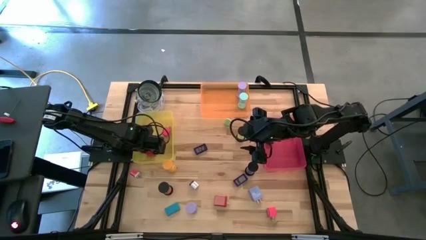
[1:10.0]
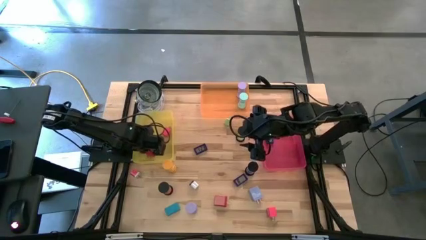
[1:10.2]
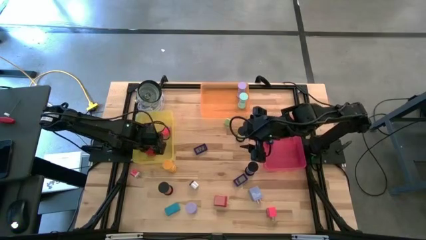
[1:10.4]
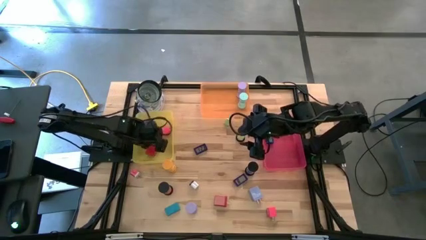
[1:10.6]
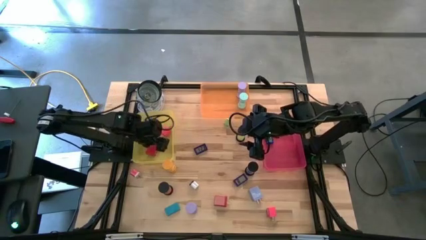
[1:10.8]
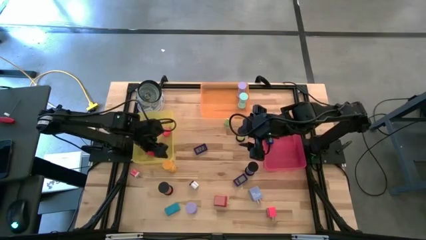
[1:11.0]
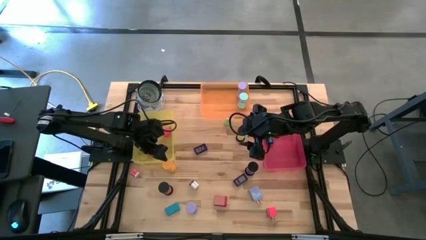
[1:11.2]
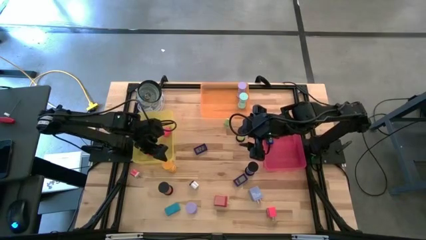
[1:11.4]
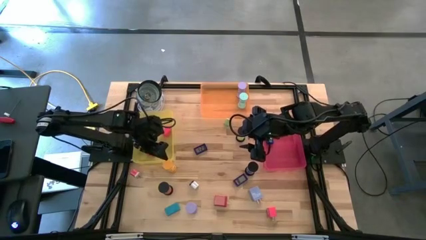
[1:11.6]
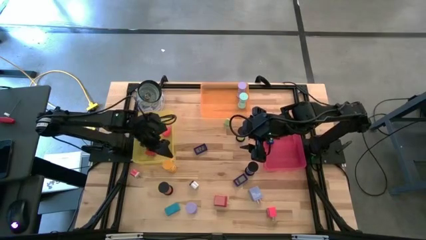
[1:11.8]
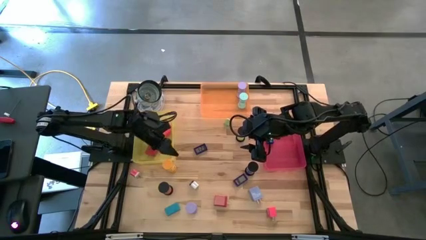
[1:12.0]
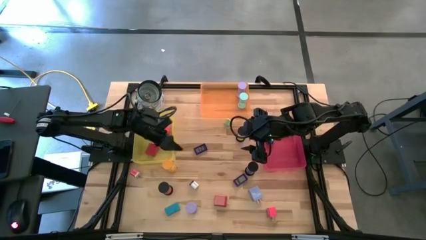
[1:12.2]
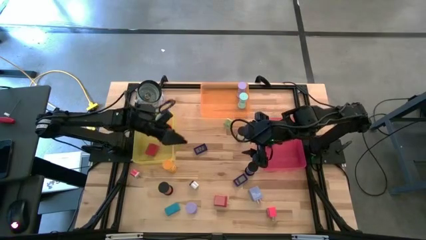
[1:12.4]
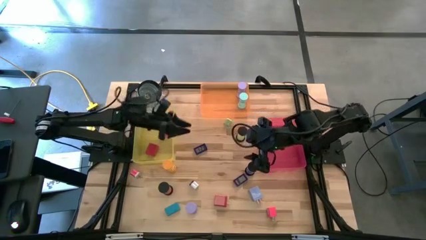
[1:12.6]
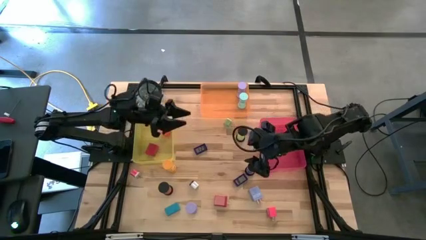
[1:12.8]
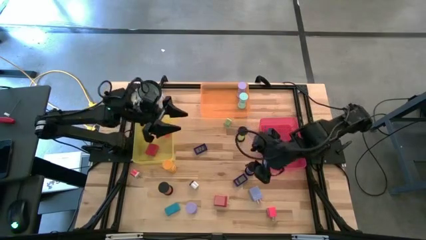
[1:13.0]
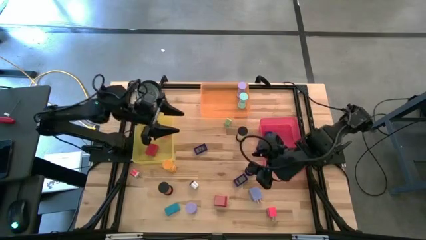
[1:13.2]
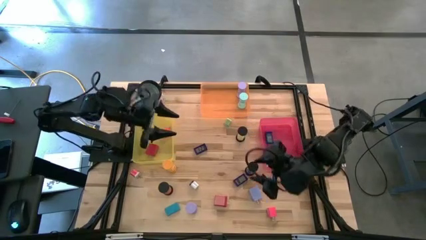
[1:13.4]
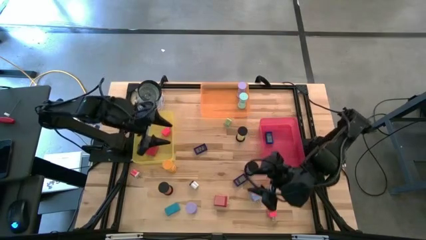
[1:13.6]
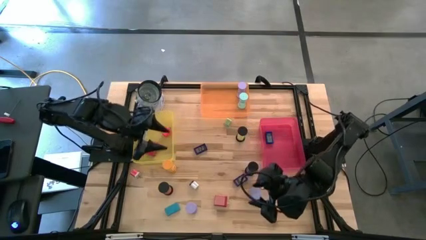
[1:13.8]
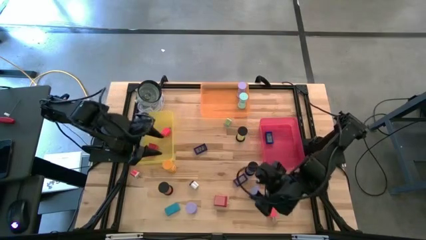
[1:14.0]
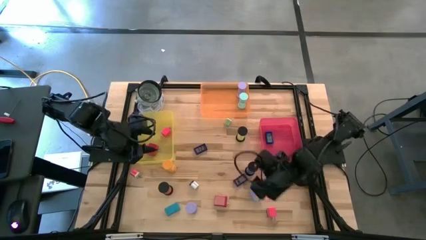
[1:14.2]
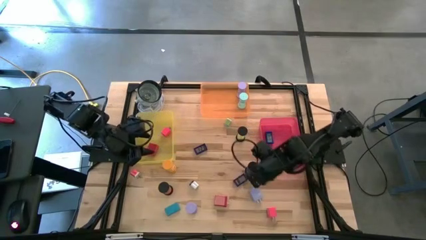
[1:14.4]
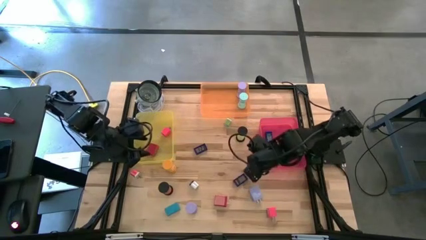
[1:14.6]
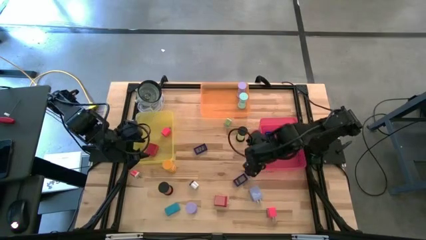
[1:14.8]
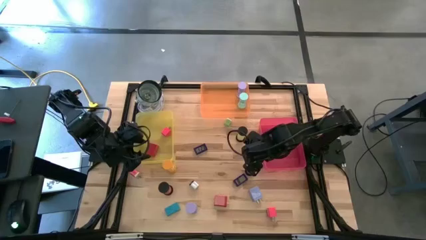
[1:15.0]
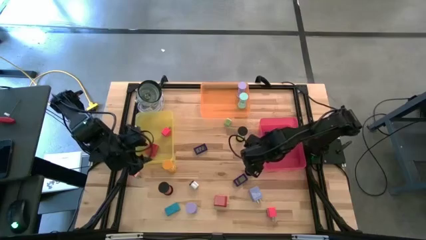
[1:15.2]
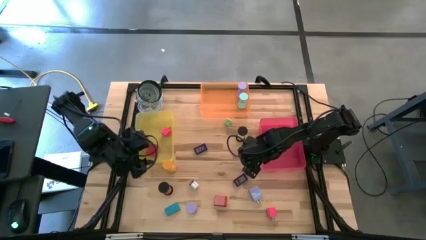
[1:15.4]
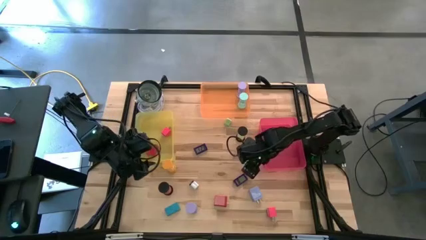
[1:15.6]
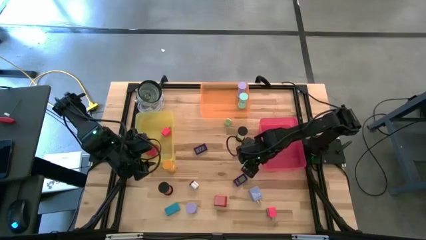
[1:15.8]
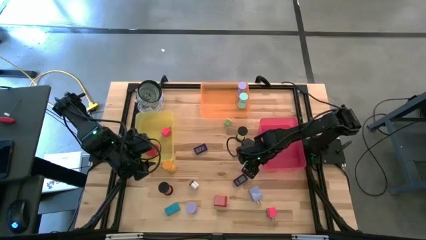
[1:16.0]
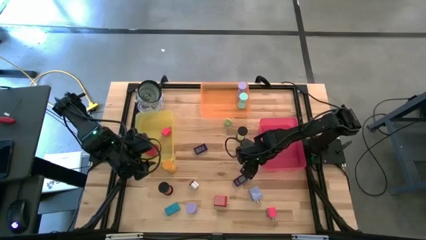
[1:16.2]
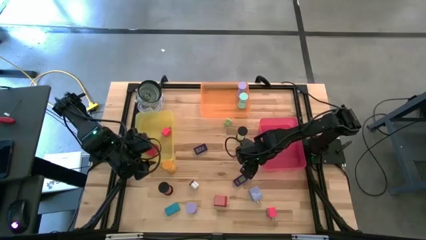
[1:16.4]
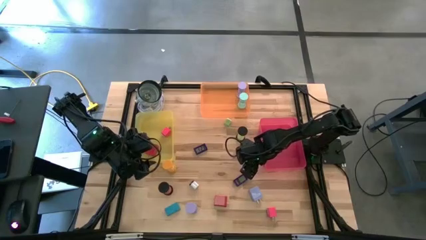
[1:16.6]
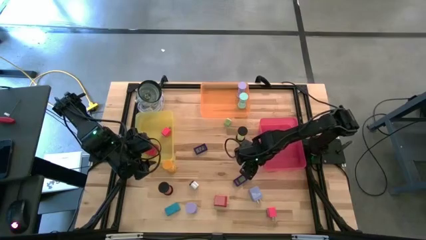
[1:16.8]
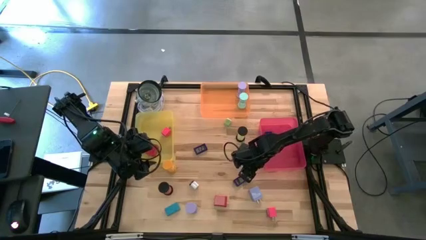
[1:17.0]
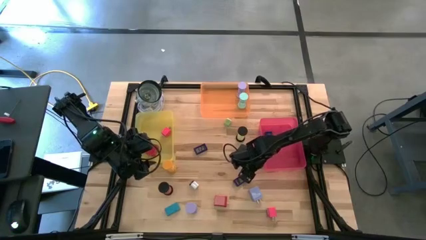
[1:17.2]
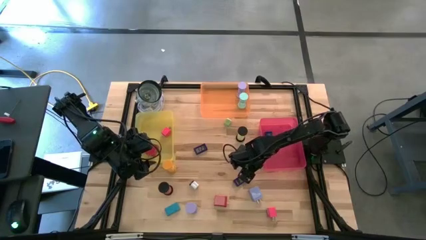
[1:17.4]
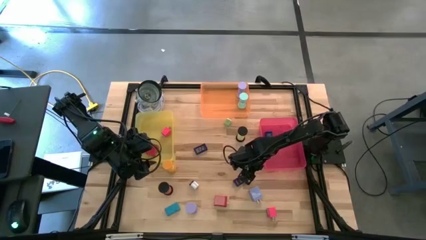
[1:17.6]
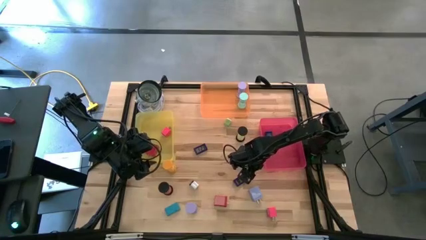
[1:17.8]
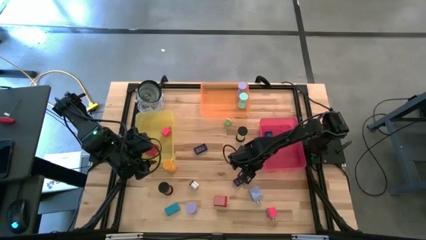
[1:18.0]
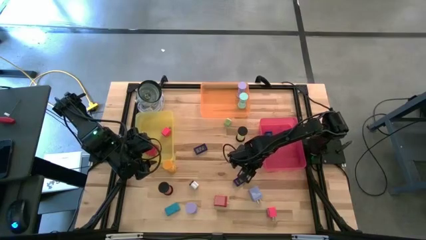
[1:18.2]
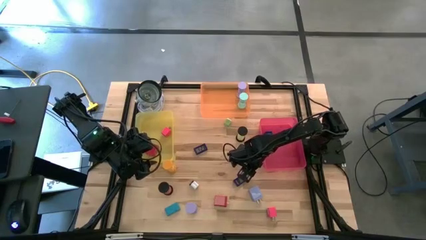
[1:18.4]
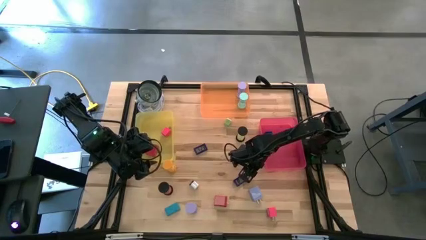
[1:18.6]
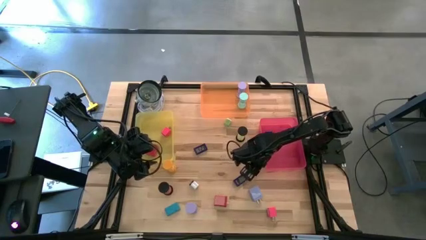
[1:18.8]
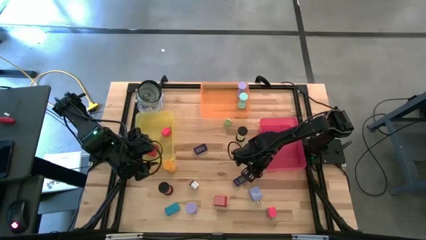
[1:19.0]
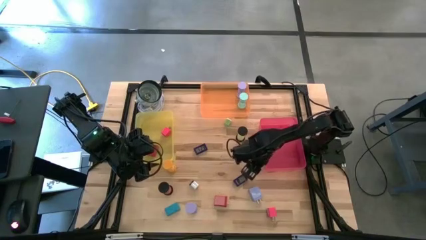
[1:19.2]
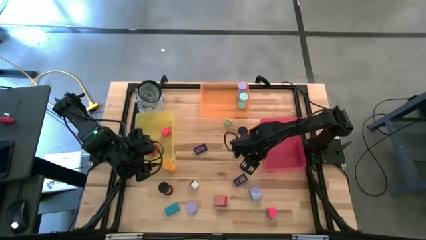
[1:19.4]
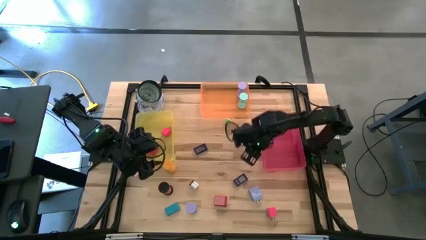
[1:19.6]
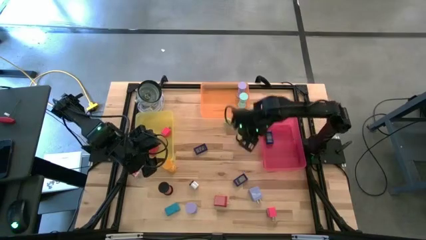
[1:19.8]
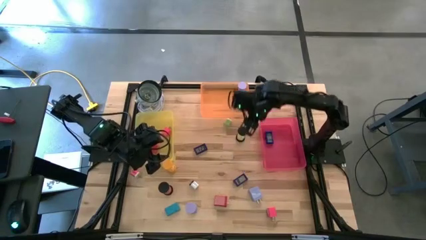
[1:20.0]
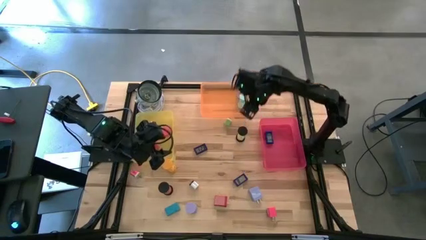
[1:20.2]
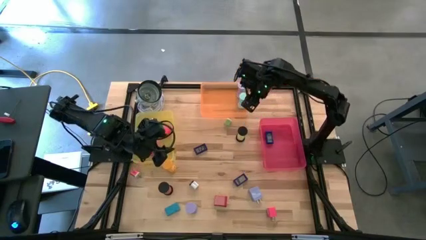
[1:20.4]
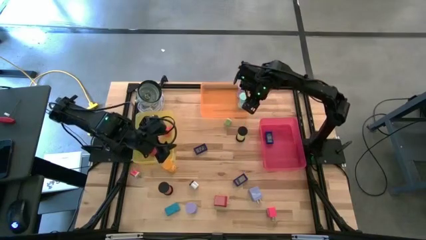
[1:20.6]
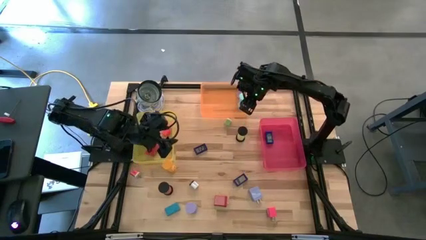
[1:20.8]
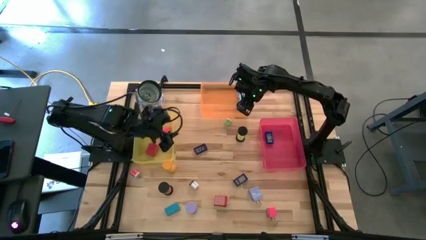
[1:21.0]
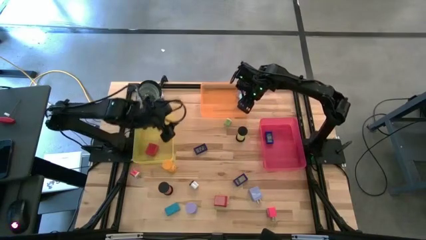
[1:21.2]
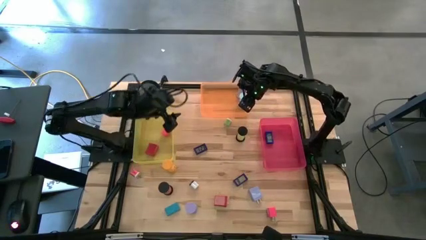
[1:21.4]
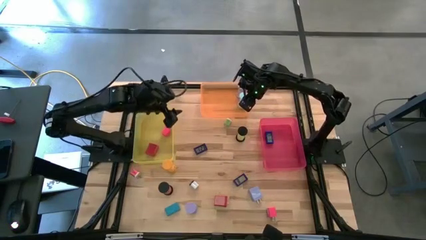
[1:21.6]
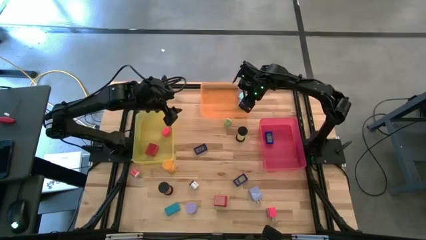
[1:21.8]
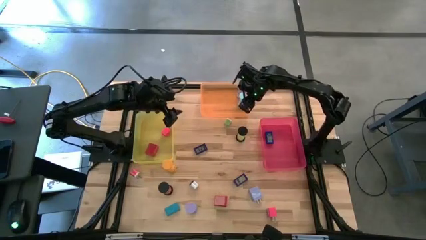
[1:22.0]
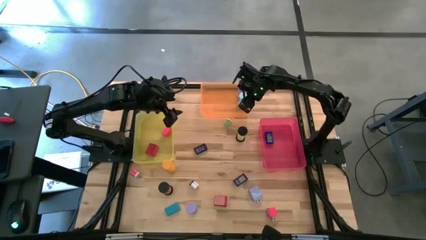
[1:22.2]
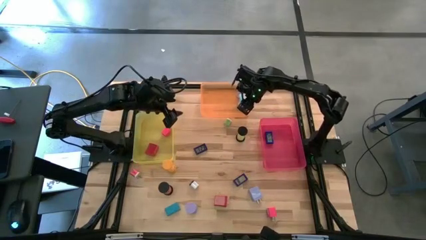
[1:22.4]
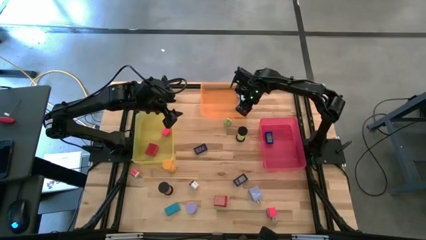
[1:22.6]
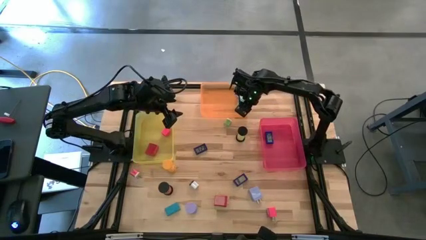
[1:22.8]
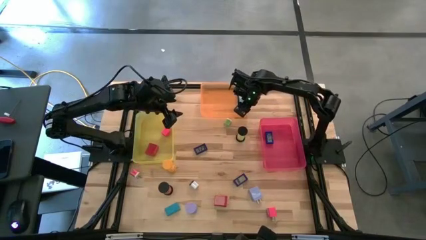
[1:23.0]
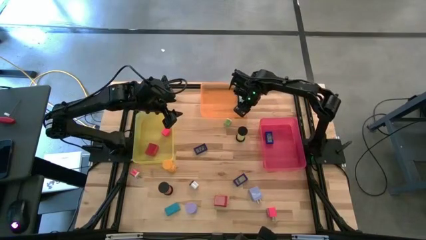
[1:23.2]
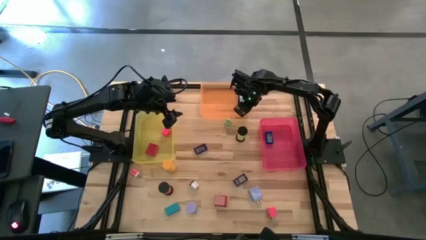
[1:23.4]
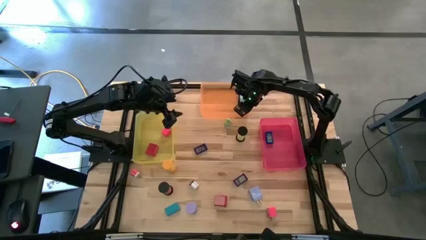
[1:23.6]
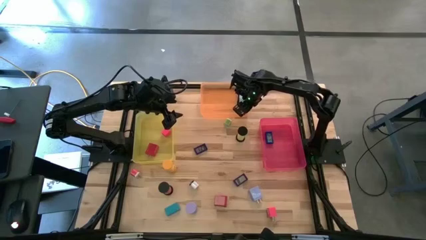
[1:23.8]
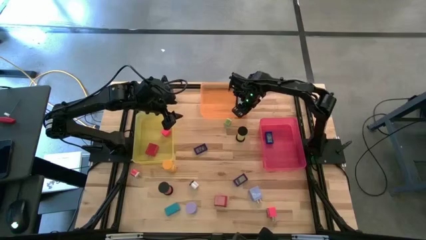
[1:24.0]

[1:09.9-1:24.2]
Task: Pick & Place Office items
Put the blue hourglass in the orange bin

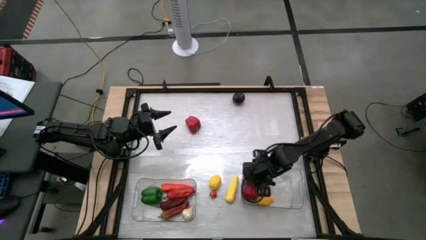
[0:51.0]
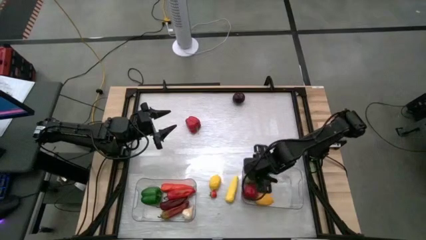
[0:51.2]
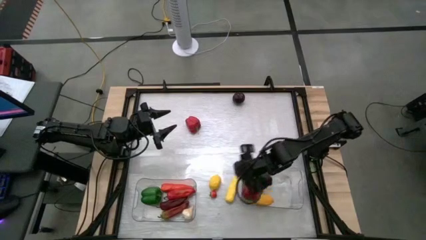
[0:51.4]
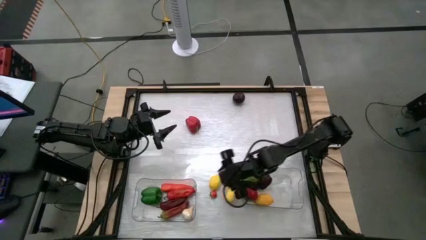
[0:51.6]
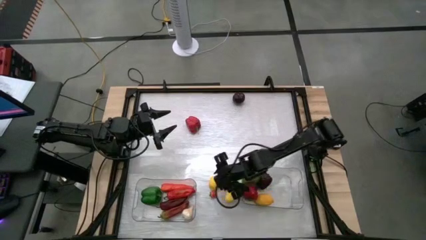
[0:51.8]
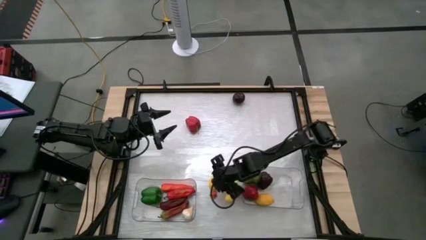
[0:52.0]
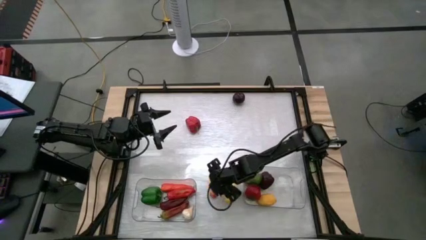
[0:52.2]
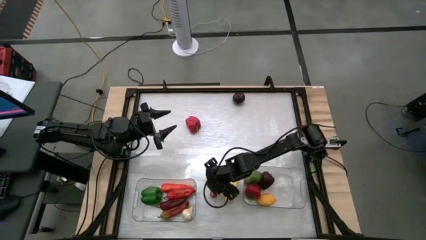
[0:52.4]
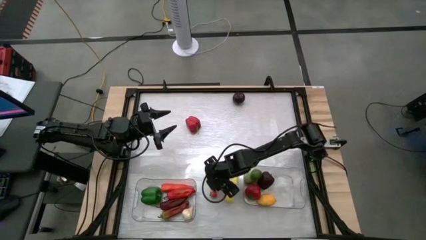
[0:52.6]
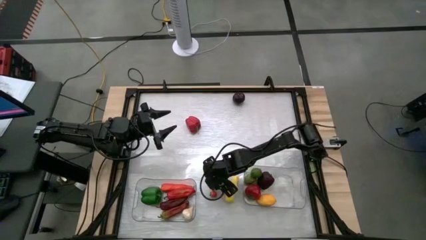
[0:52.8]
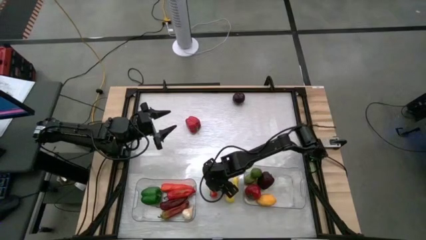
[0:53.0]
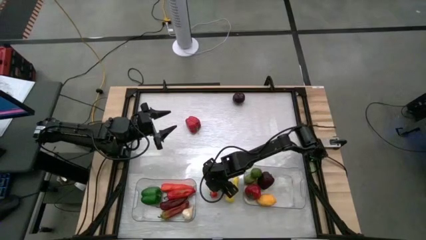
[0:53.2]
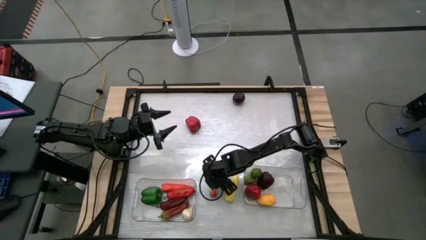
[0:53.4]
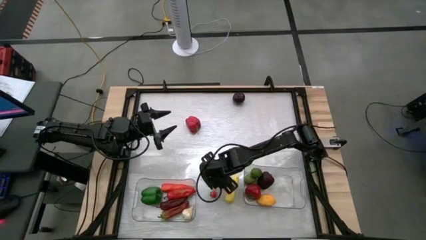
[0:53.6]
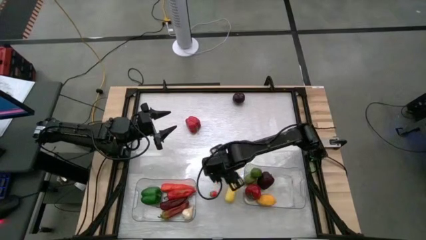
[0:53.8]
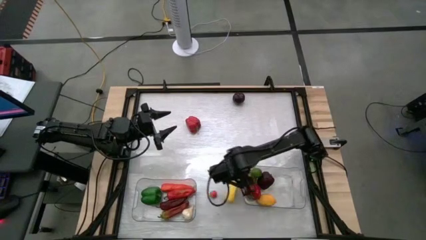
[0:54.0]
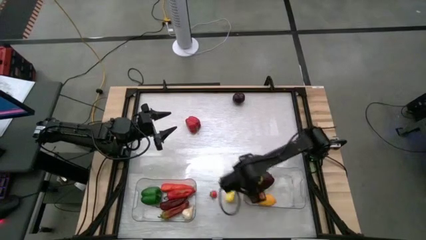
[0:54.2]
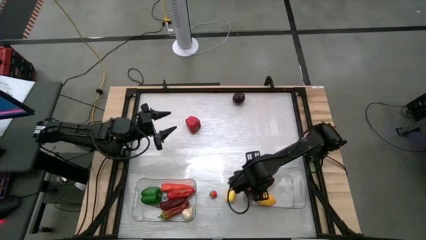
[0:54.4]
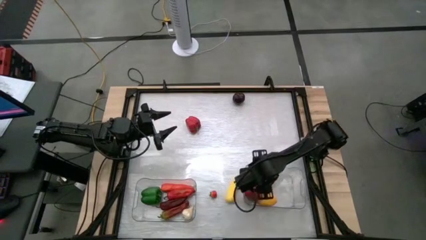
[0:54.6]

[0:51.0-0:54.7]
Task: Sort produce into baskets
Put the yellow lemon into the right transparent bin
